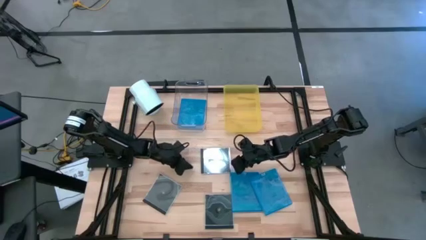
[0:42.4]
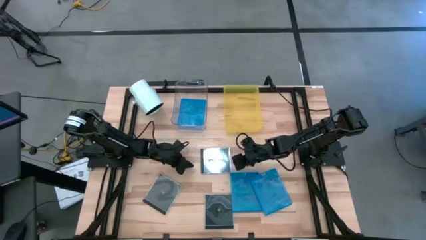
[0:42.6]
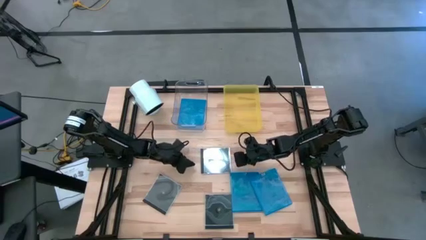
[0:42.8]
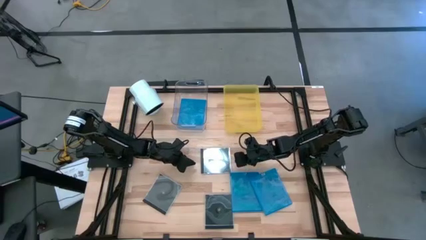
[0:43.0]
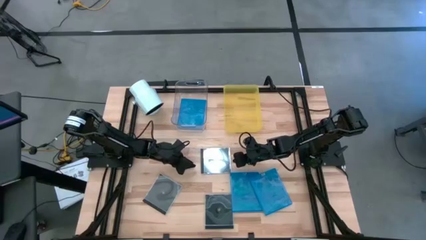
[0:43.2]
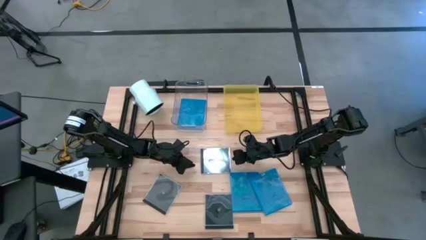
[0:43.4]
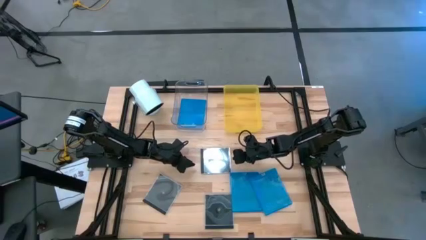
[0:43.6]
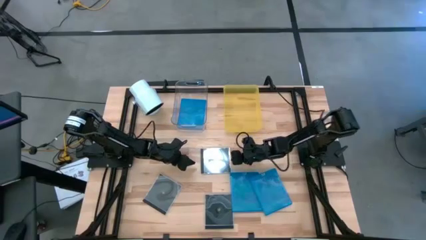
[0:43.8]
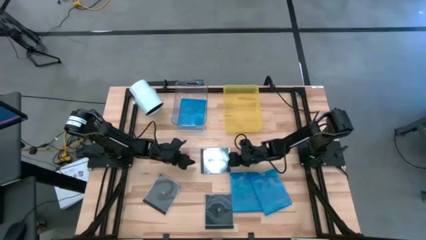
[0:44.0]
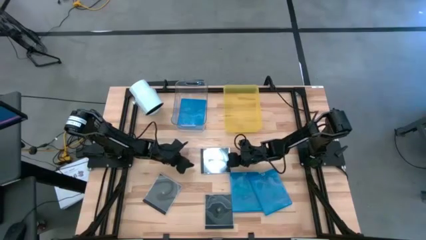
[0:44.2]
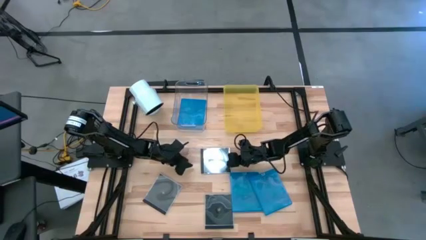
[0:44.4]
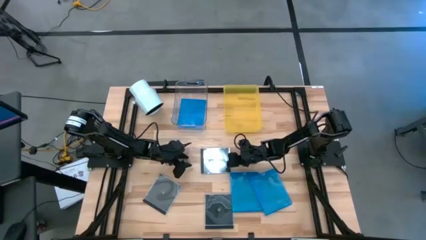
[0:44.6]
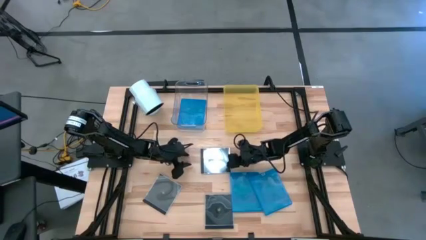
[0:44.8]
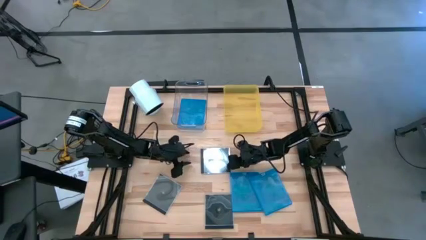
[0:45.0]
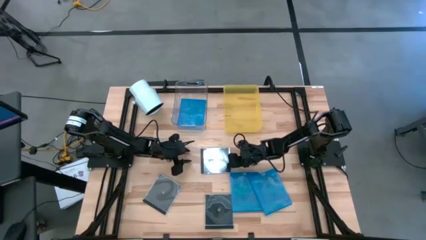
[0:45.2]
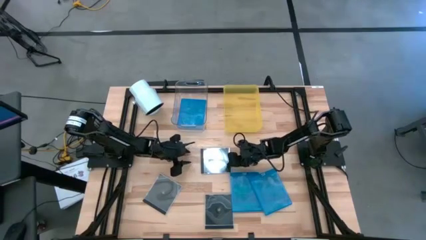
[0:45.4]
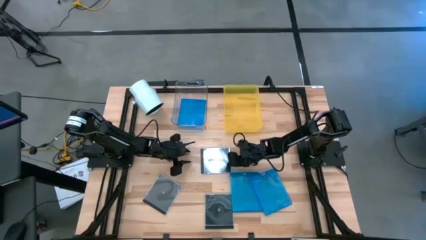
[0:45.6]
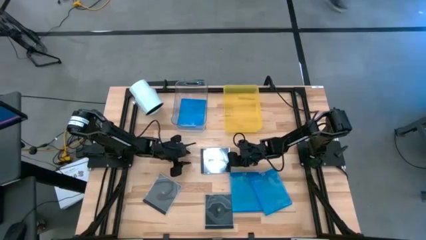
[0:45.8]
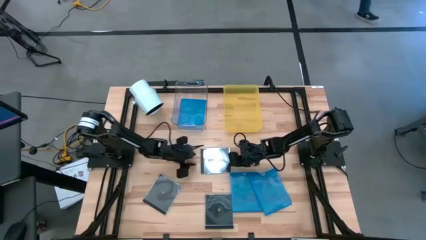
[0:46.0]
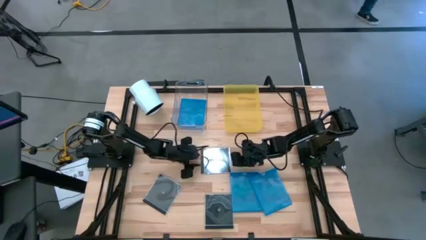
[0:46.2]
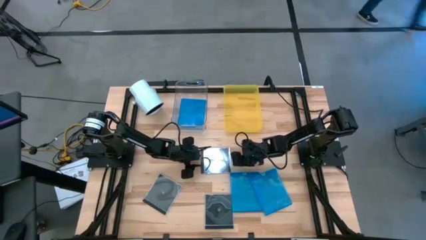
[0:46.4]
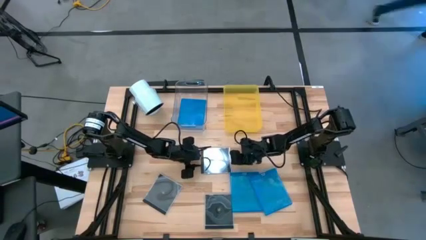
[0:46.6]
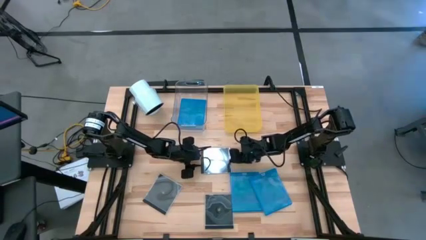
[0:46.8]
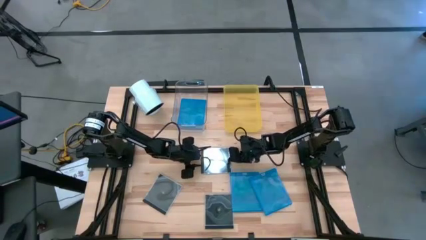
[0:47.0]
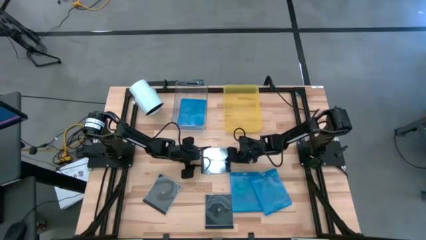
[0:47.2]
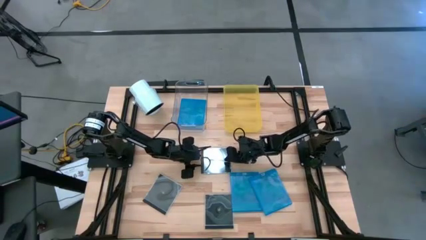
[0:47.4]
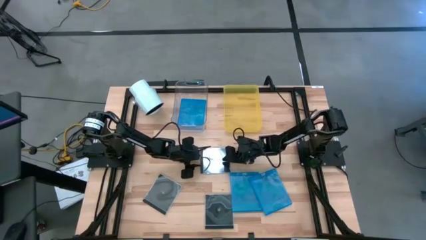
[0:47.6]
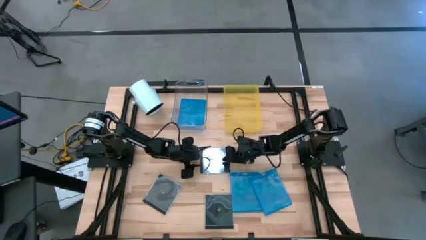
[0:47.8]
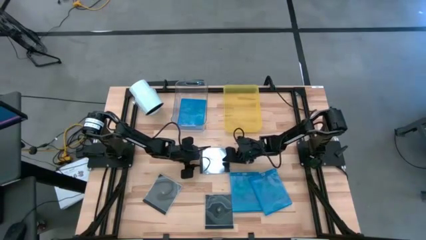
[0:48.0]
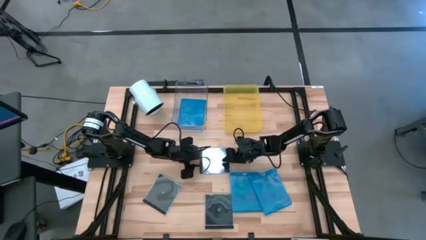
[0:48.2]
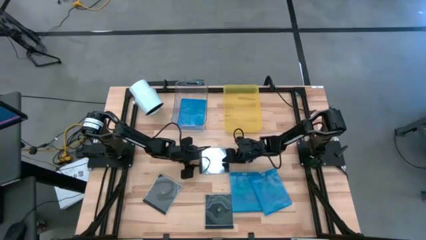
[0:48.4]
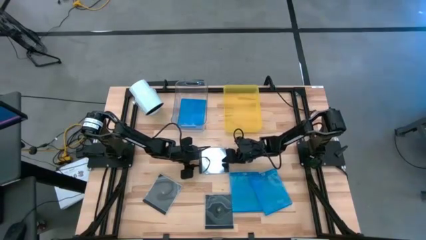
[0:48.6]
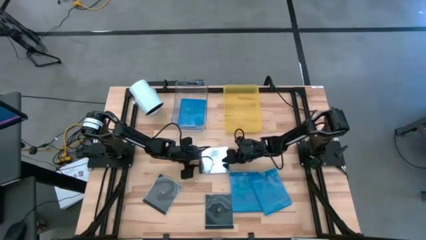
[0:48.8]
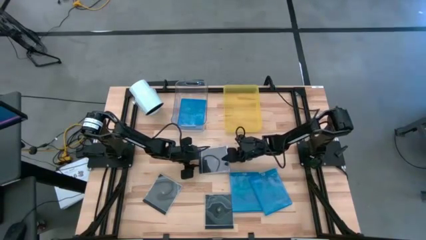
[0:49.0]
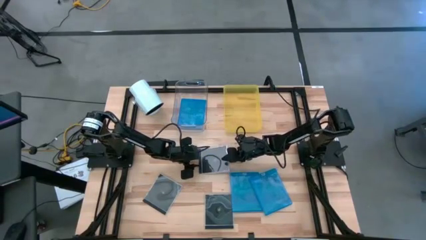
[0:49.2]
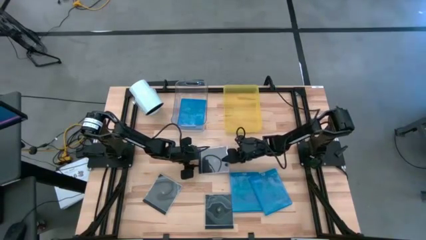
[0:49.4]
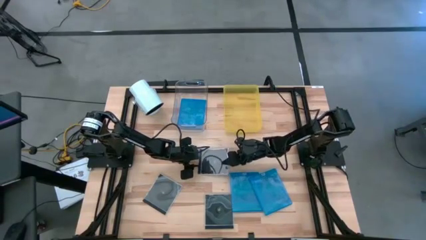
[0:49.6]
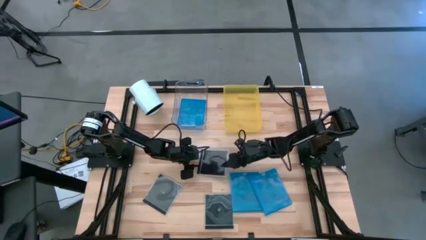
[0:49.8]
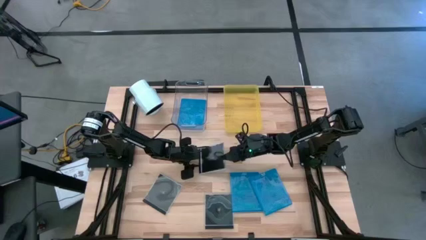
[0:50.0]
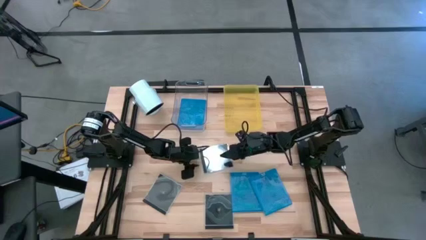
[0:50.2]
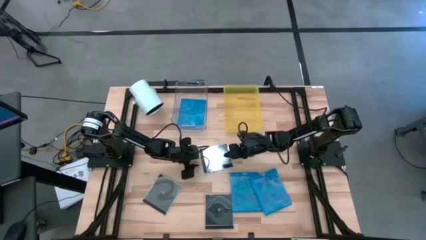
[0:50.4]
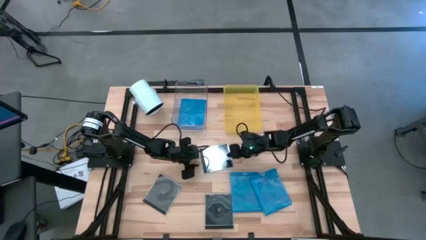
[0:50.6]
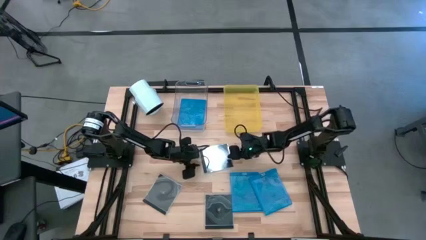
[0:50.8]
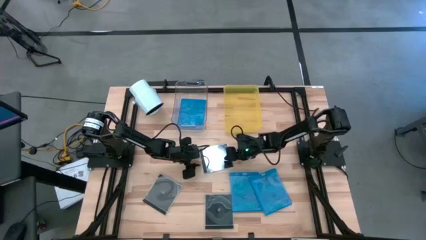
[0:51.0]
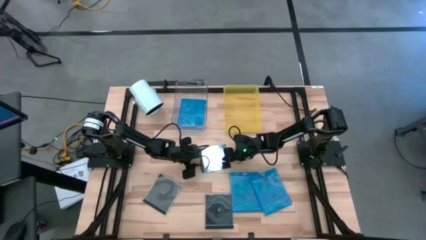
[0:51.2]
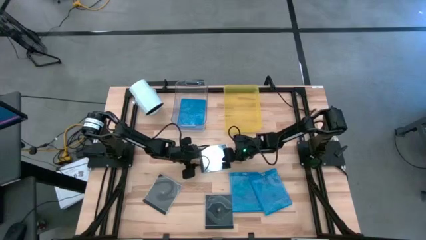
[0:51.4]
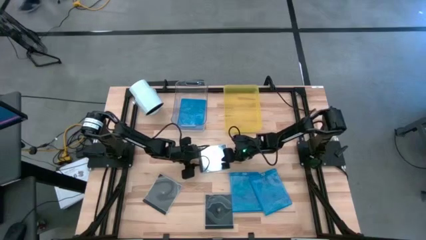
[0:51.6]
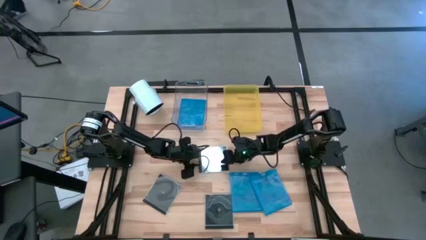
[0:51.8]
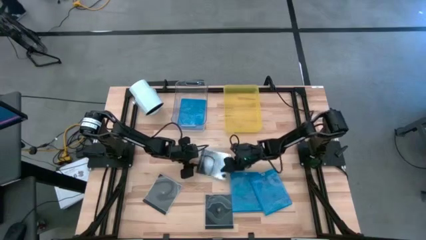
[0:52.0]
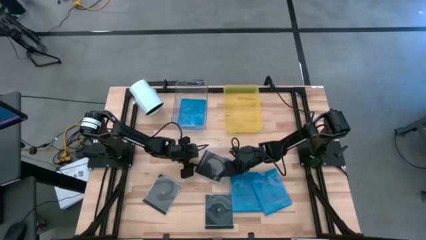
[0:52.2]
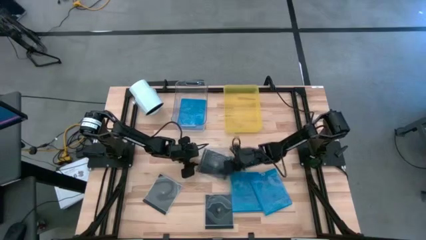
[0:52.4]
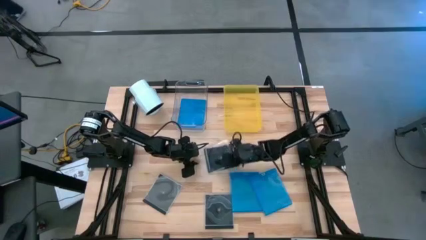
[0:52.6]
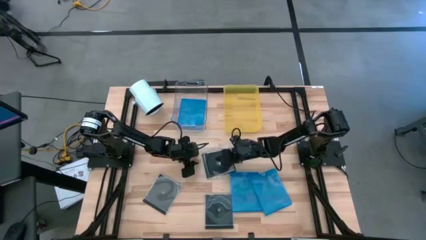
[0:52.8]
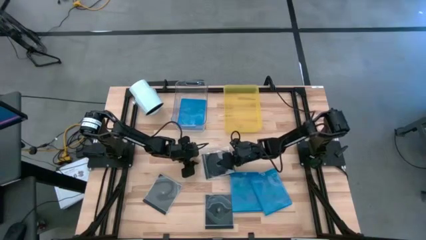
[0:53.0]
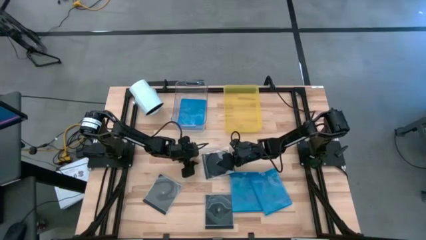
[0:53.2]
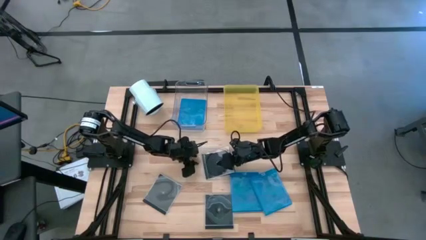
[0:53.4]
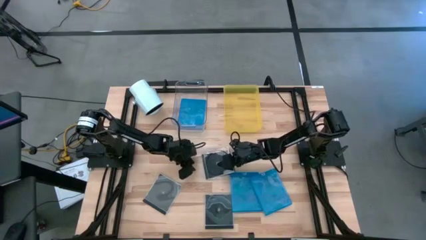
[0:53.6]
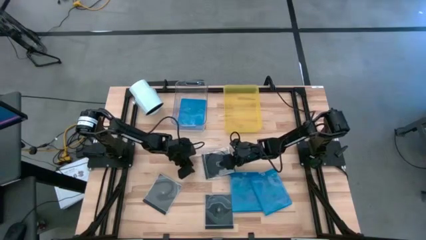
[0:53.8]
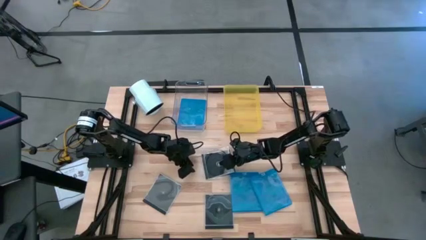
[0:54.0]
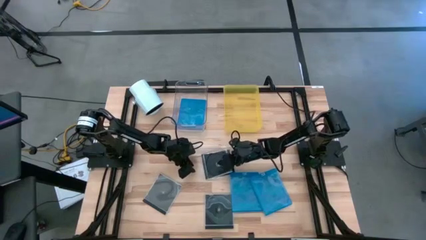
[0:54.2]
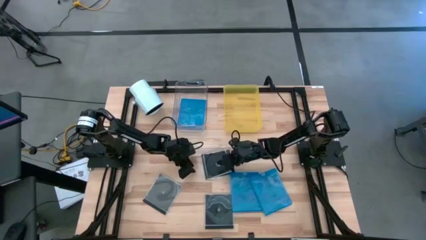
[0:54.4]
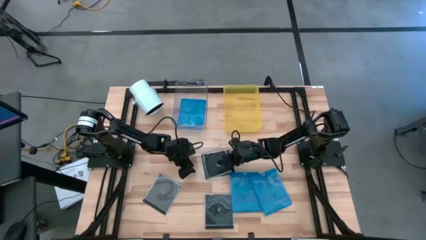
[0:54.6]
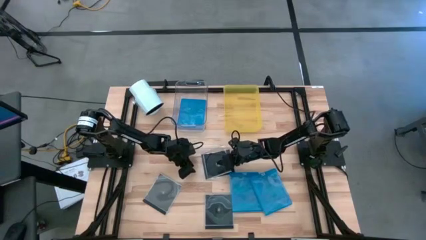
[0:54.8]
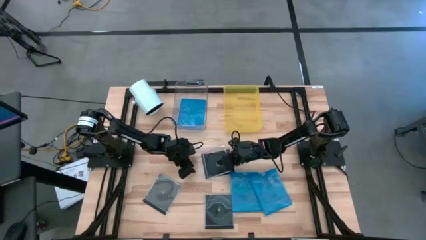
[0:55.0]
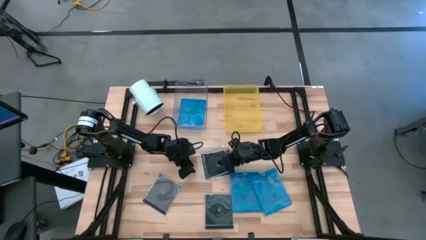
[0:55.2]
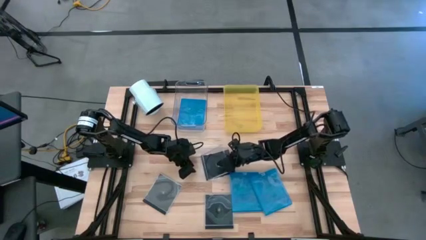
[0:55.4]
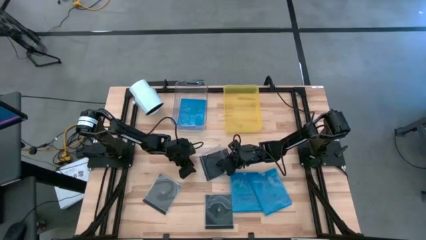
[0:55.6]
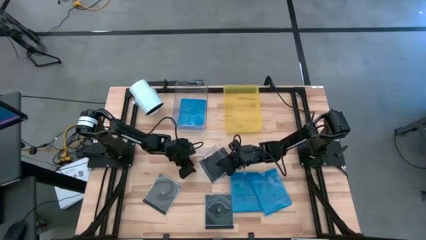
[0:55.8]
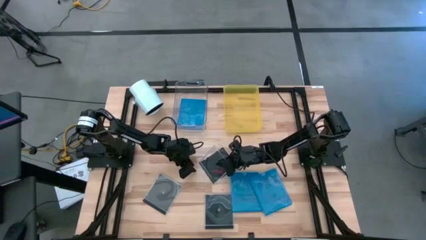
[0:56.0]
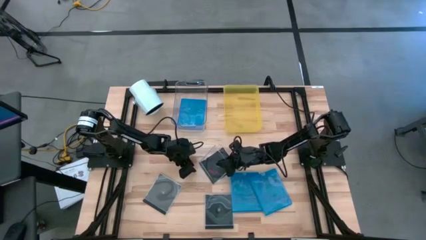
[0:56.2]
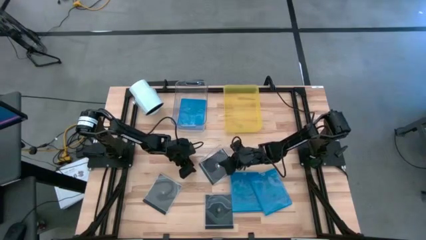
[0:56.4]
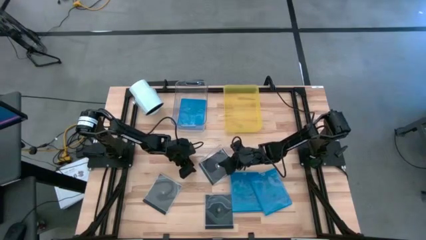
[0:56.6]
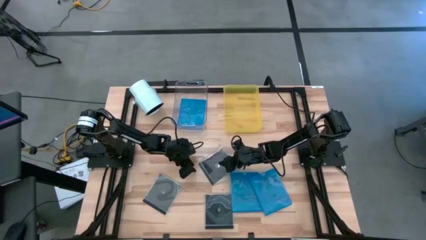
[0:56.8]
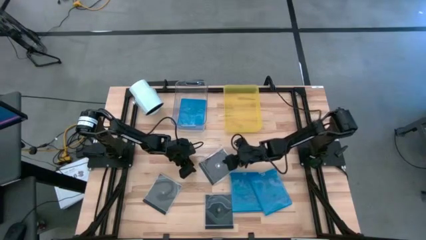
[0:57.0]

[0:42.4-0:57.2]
Task: Pick & place jewel cases by type
Put the top right black CD case into the yellow bin
